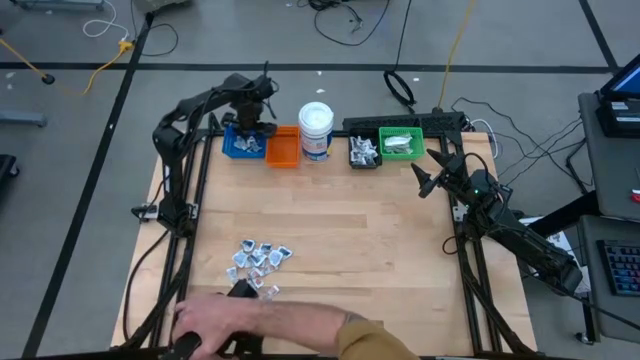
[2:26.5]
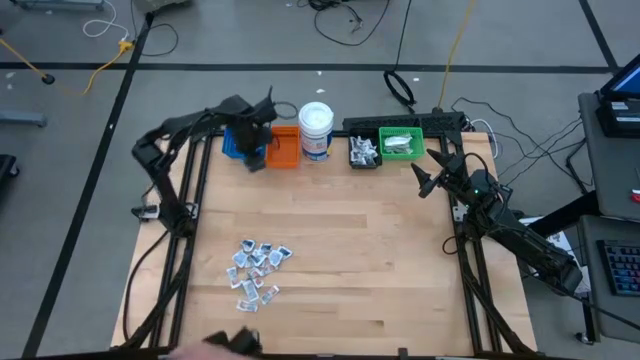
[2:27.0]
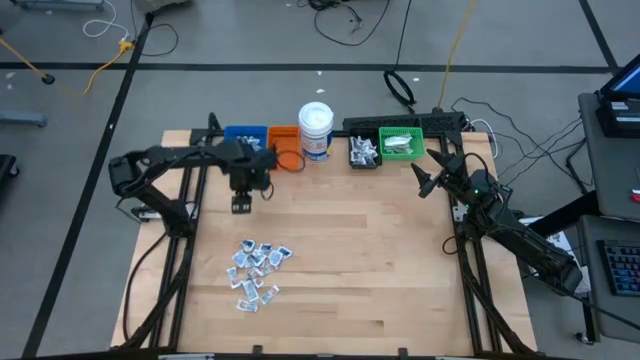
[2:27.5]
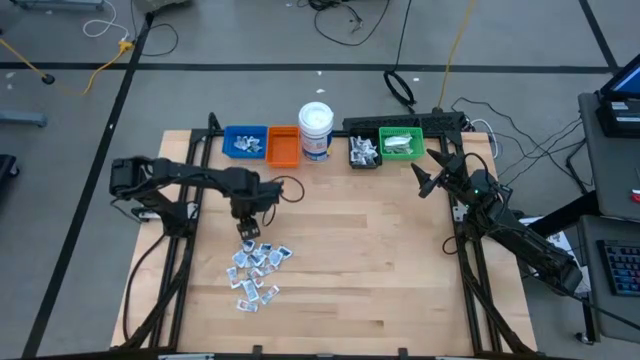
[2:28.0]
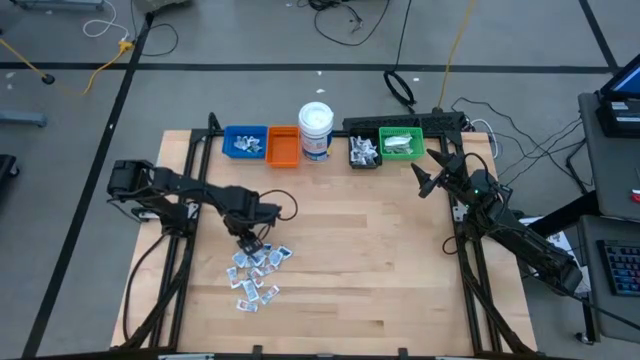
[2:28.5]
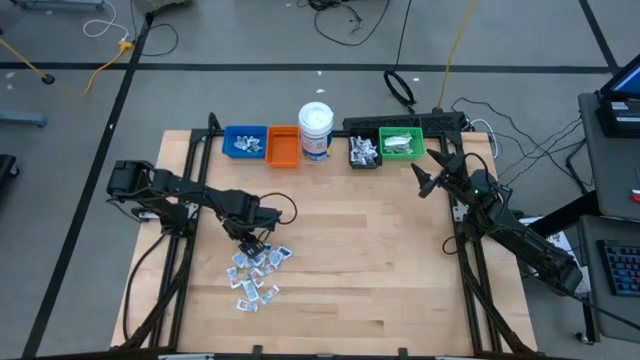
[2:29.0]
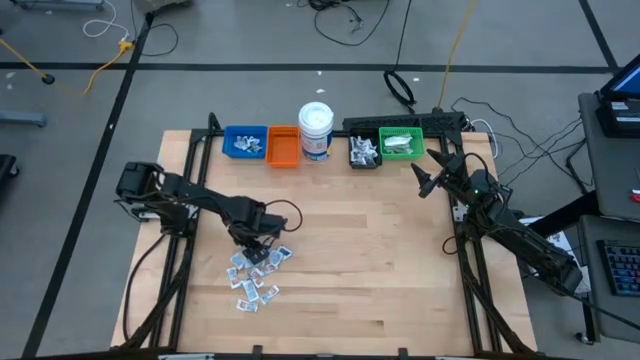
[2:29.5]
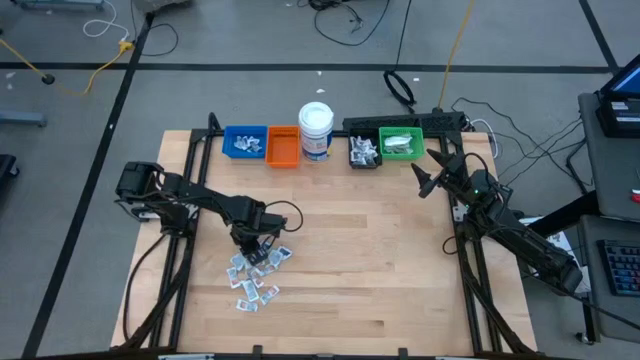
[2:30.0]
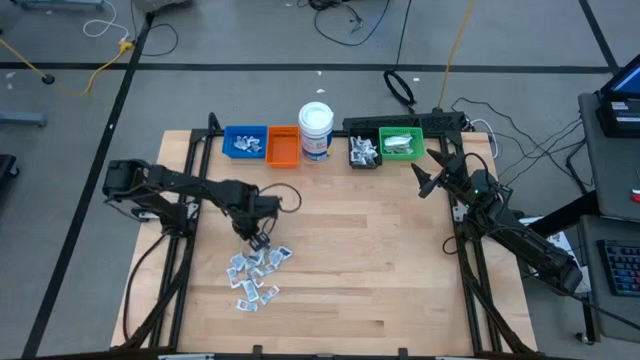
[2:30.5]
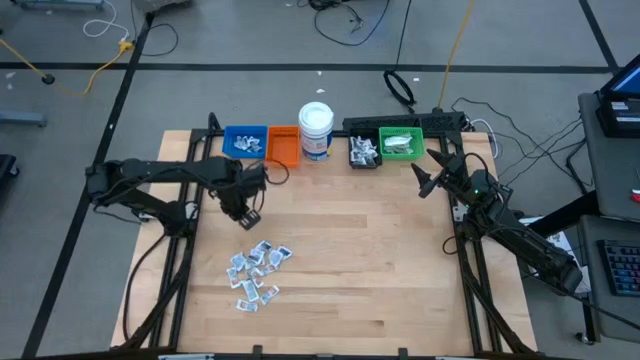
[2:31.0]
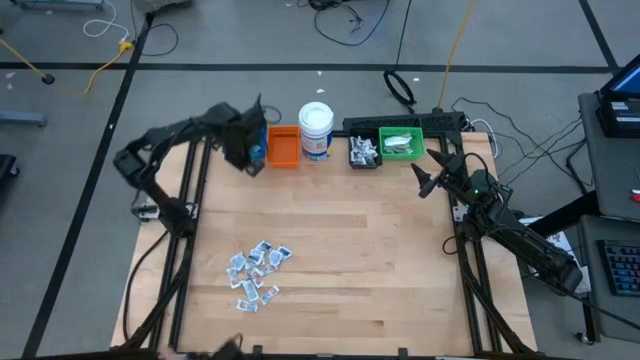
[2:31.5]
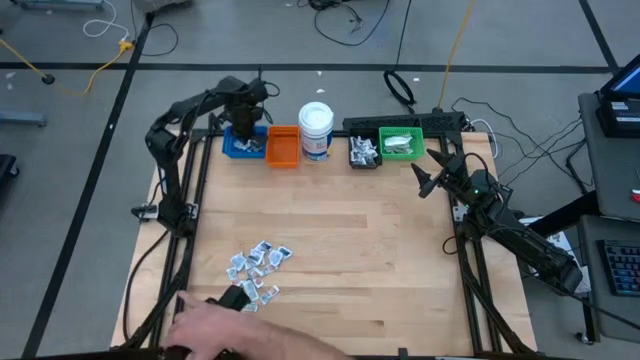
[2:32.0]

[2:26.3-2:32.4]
Task: Pick & Place First Aid Supplies
Put the alcohol pad into the blue bin

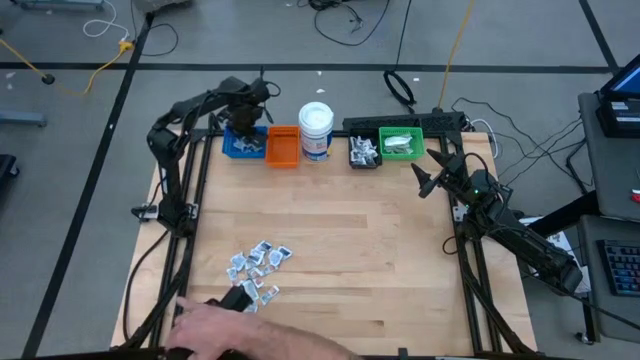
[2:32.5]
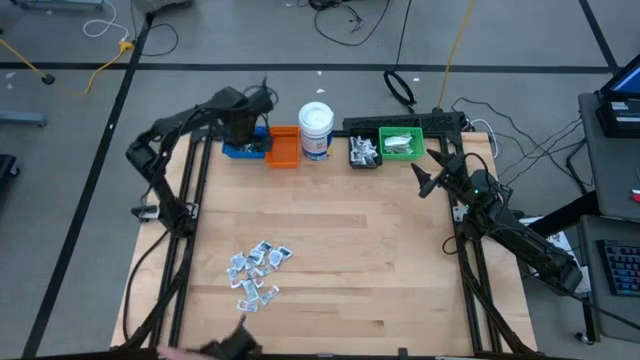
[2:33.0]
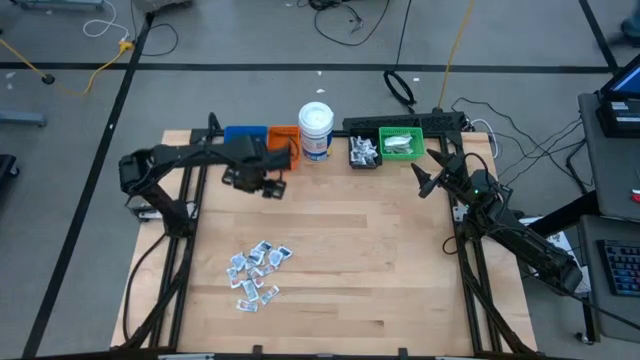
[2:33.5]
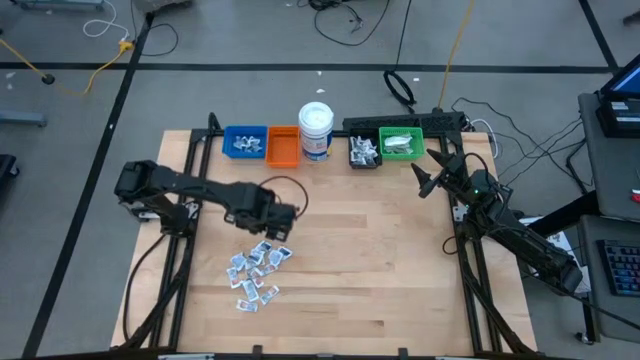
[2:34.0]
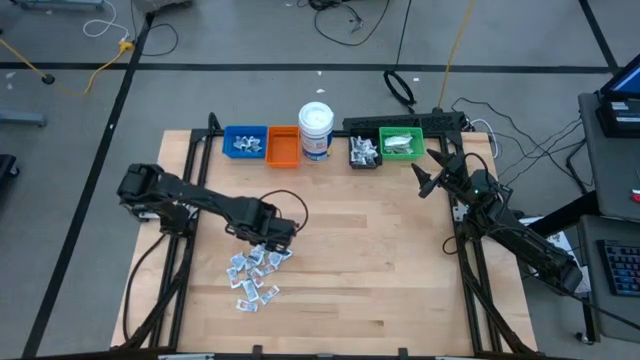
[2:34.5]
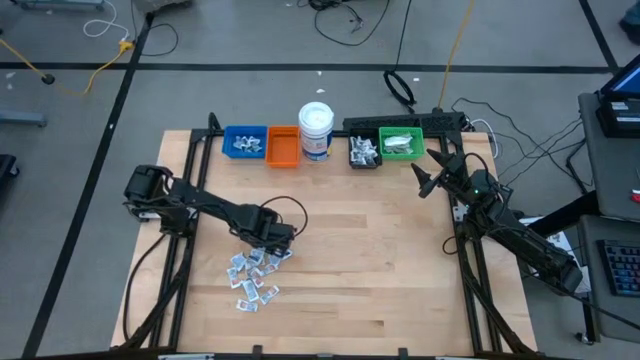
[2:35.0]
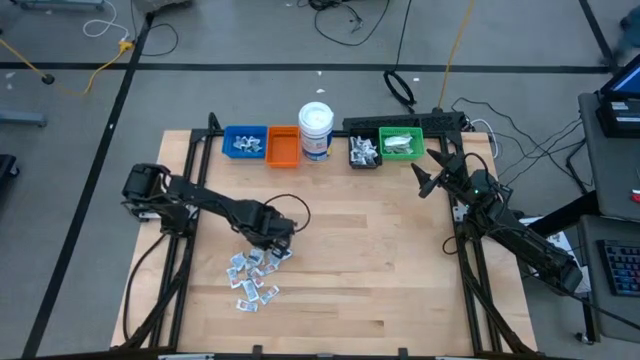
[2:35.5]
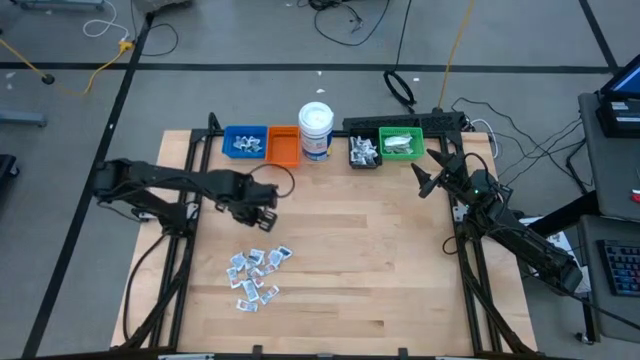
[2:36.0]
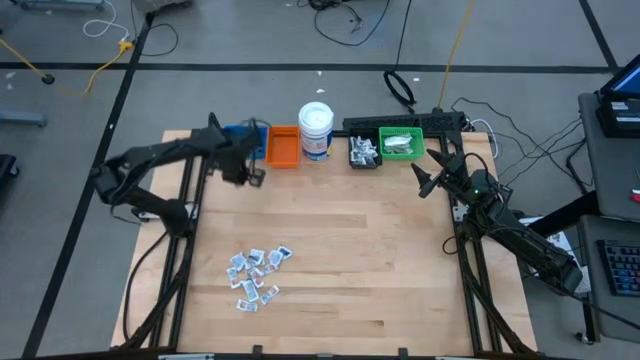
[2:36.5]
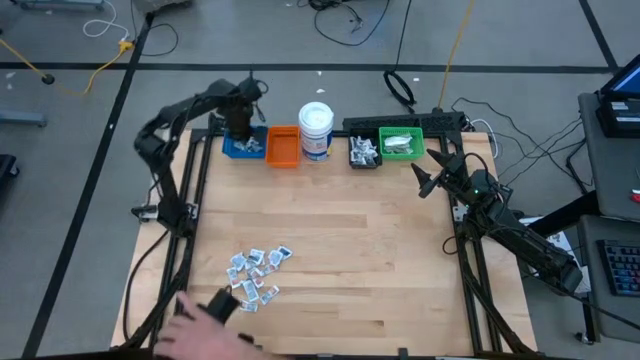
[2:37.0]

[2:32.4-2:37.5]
Put the alcohol pad into the blue bin

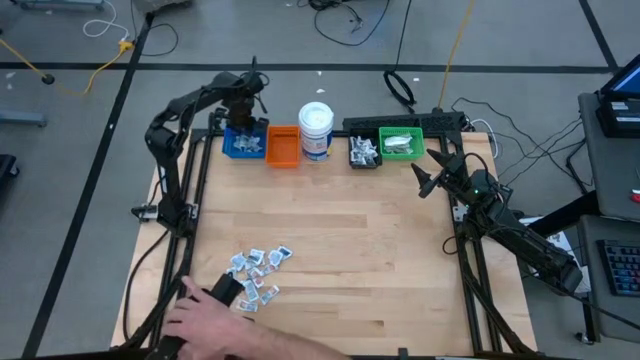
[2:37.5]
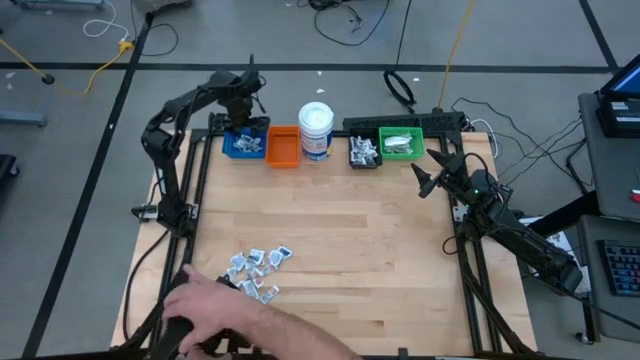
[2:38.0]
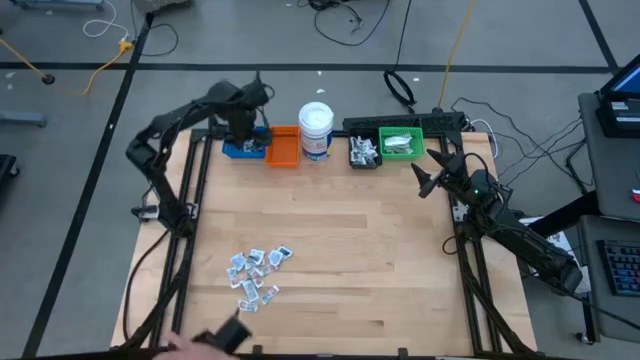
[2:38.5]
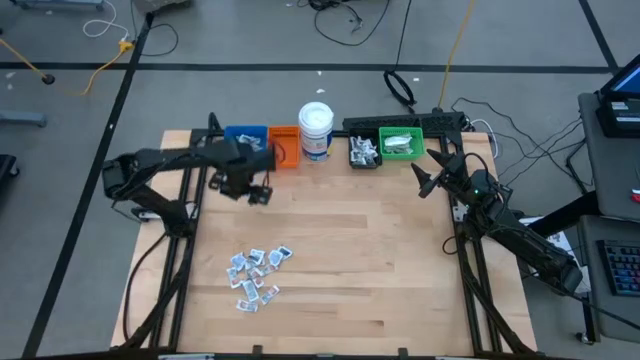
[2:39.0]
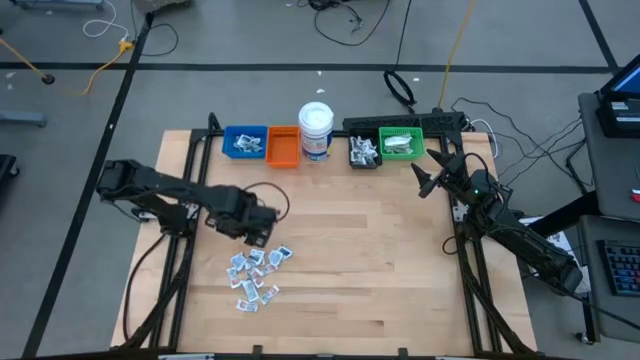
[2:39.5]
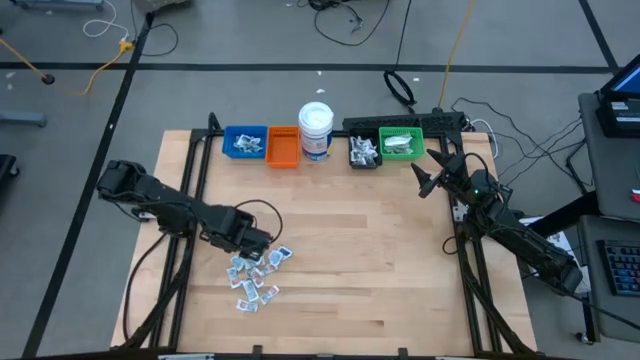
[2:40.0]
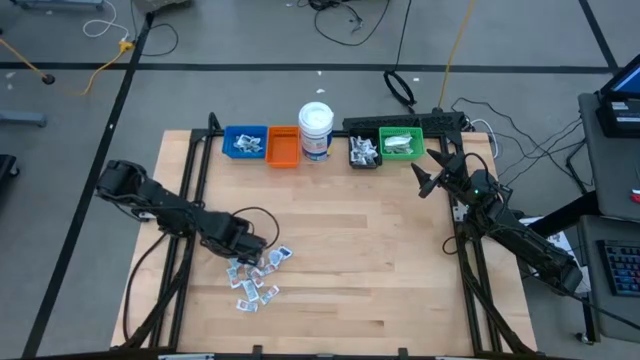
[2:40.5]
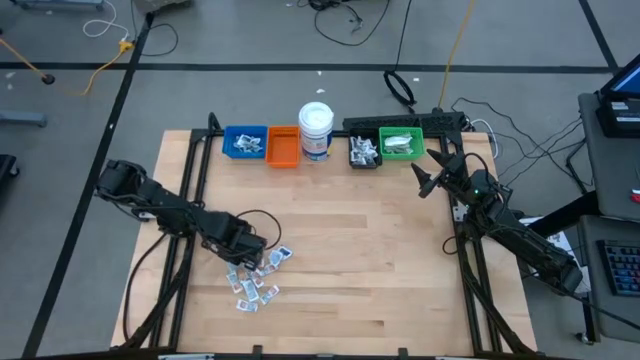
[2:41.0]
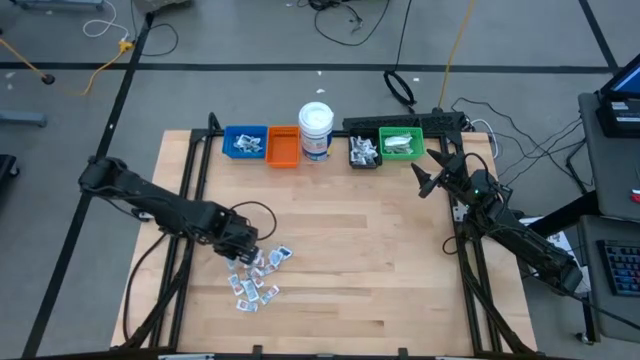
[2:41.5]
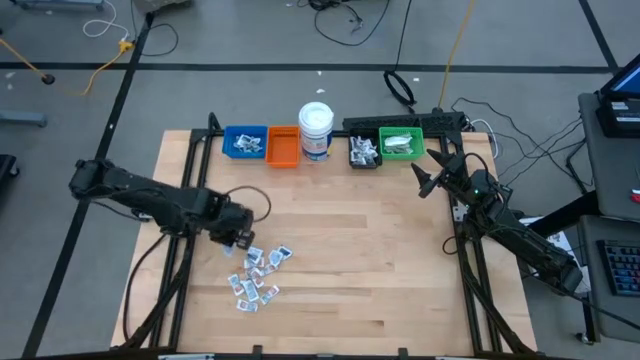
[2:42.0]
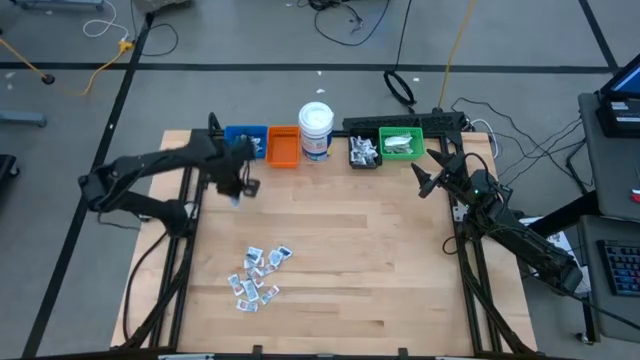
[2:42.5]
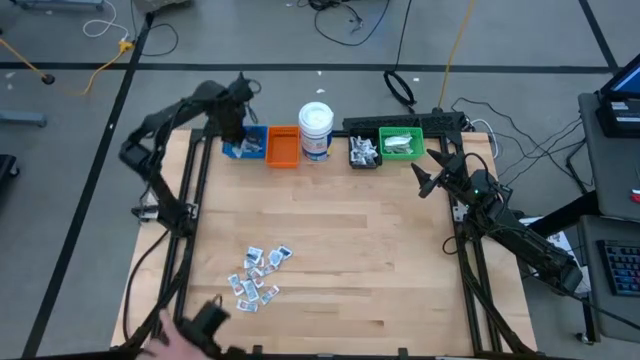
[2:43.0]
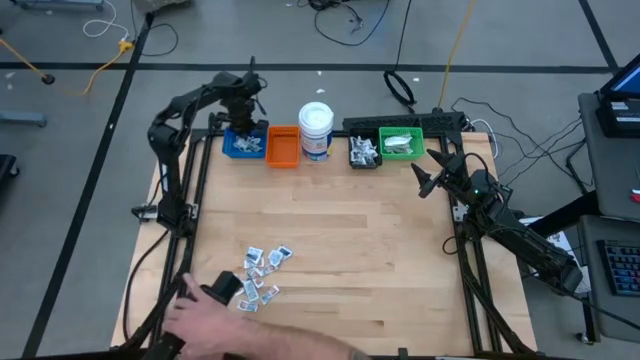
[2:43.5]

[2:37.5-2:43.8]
Put the alcohol pad into the blue bin

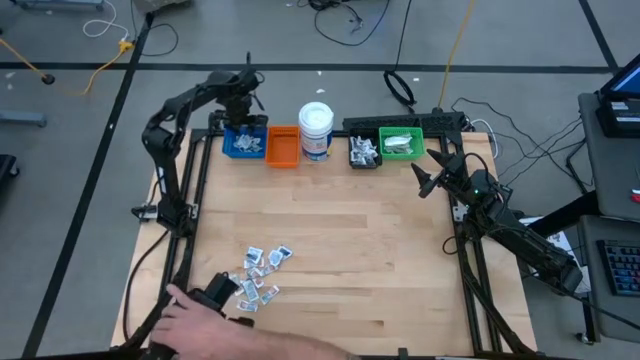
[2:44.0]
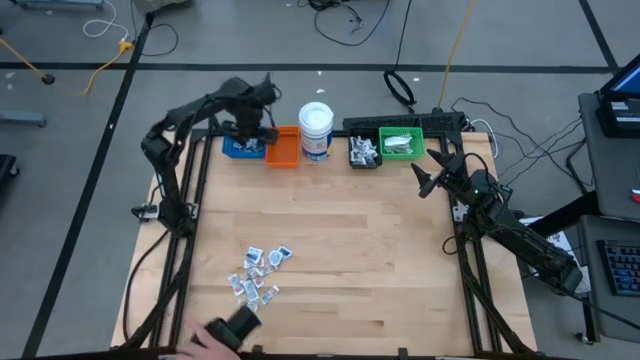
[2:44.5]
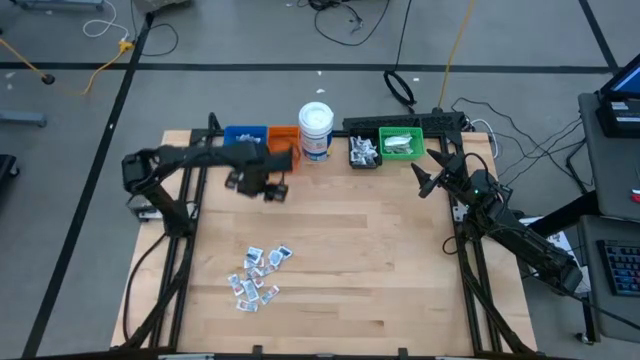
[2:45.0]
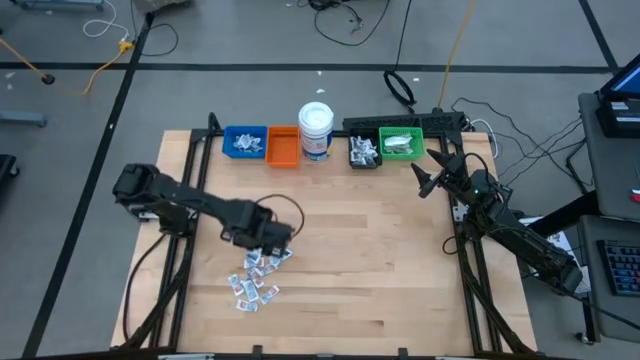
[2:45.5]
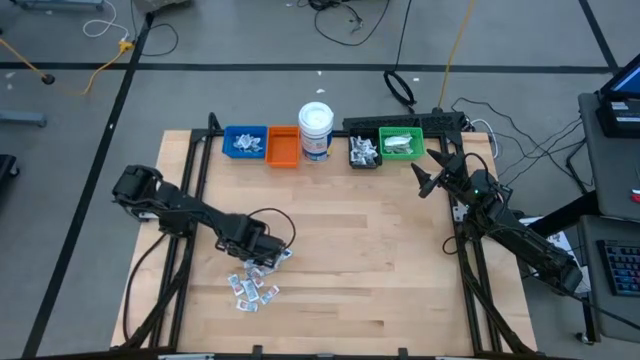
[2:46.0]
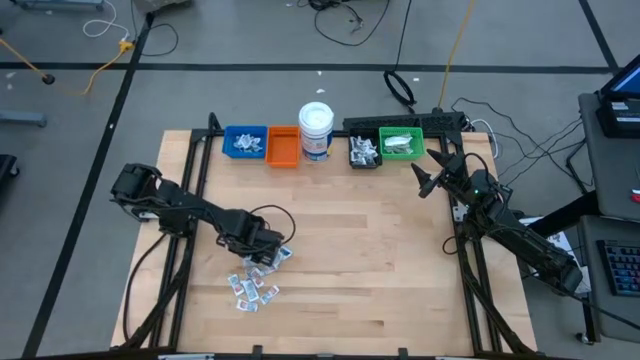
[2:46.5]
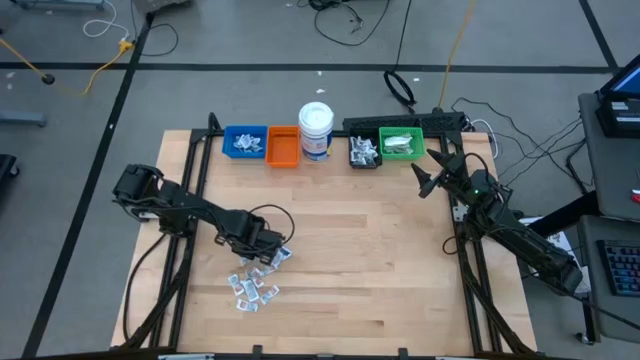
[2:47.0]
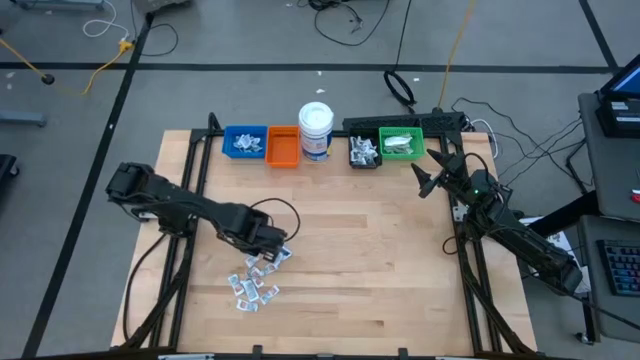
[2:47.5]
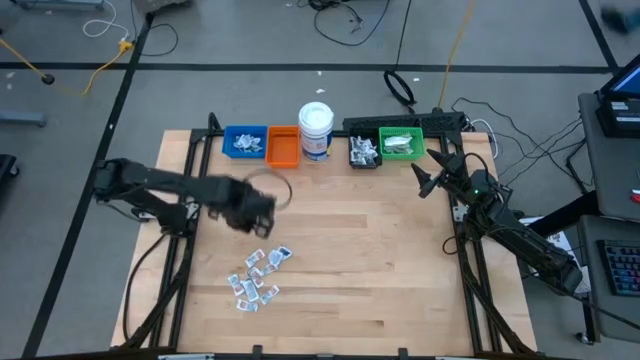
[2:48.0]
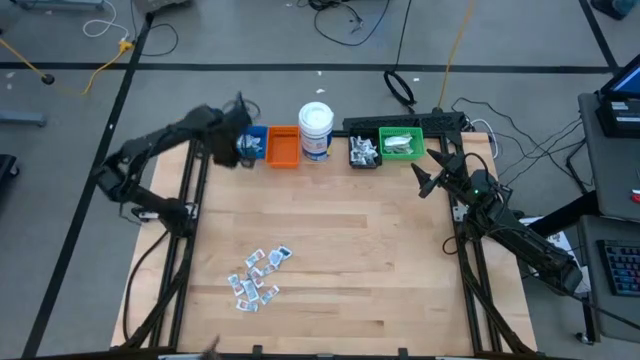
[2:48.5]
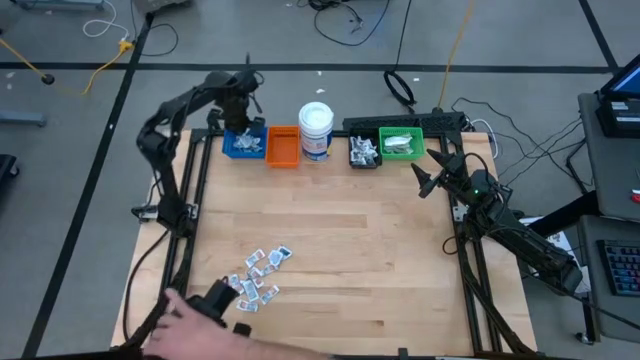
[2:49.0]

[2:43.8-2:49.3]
Put the alcohol pad into the blue bin
